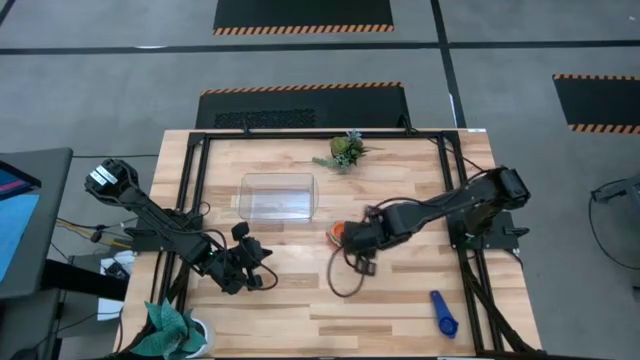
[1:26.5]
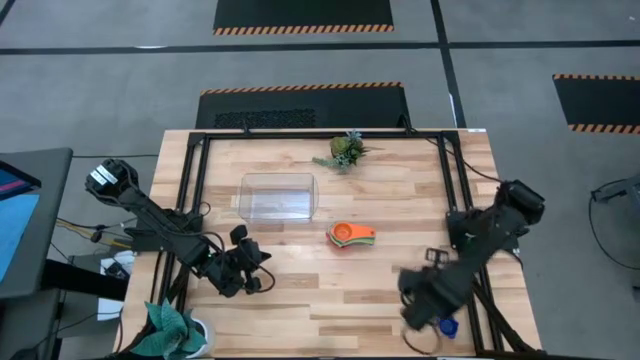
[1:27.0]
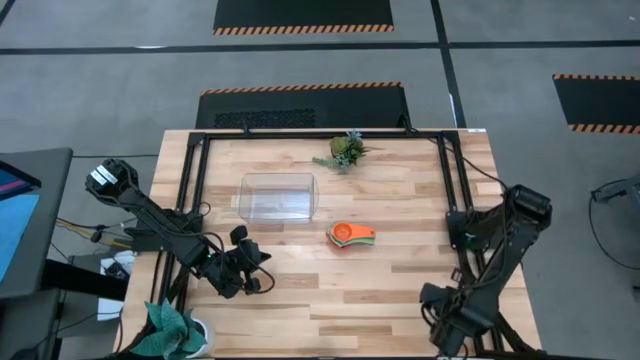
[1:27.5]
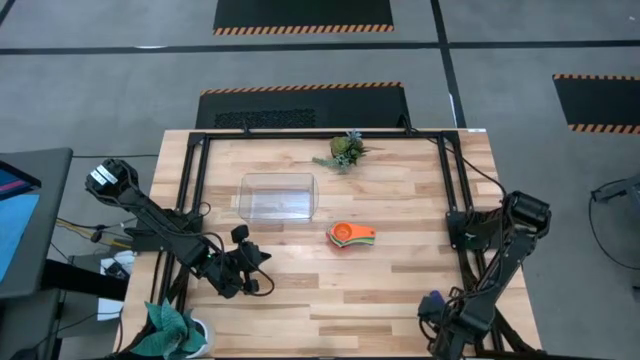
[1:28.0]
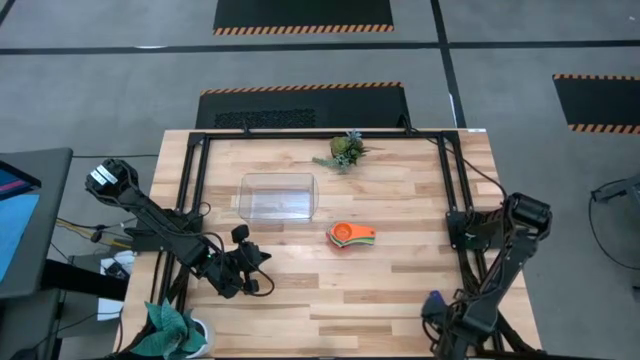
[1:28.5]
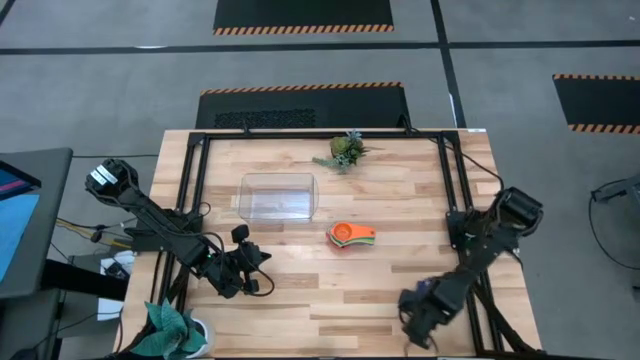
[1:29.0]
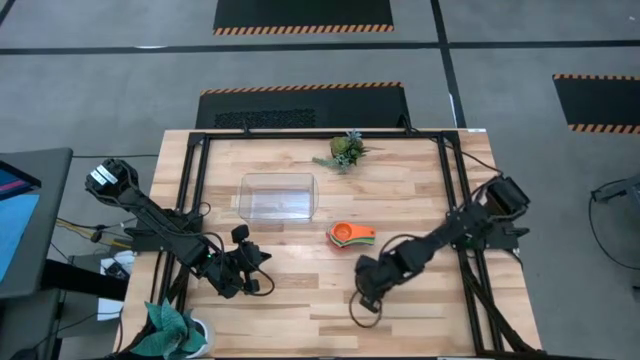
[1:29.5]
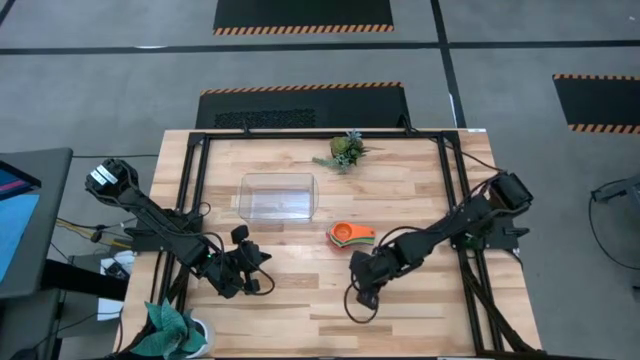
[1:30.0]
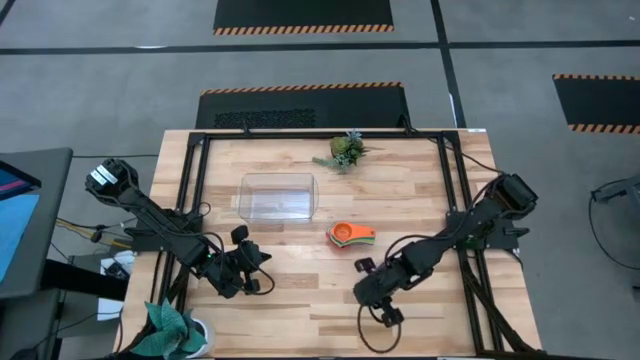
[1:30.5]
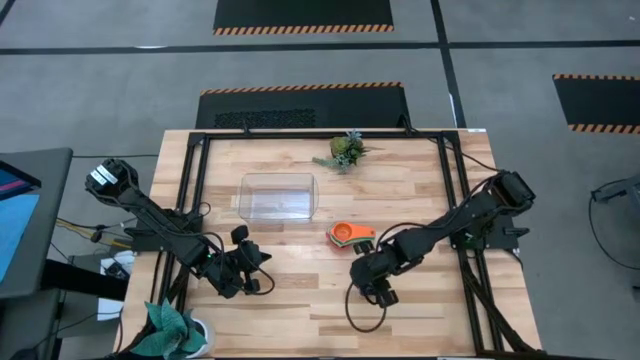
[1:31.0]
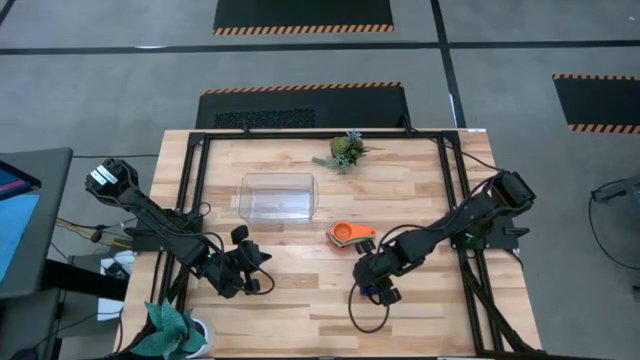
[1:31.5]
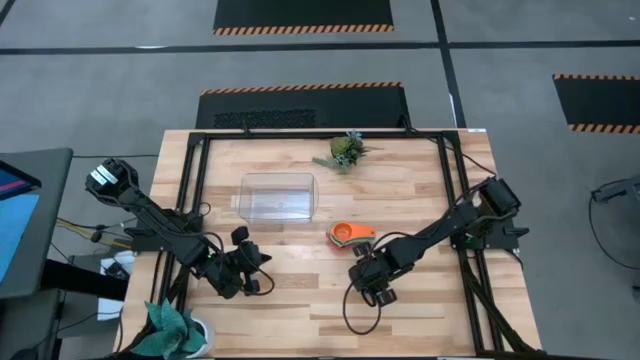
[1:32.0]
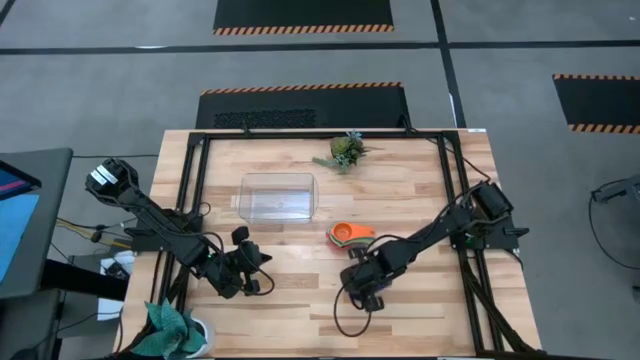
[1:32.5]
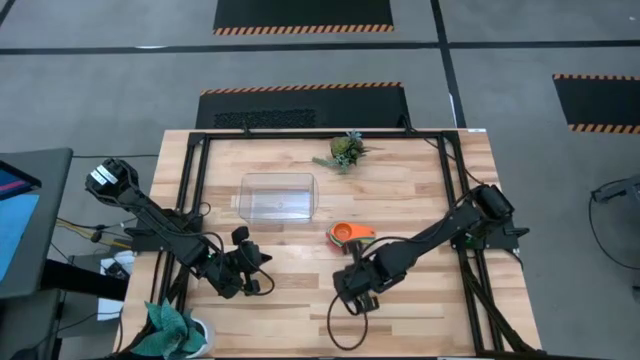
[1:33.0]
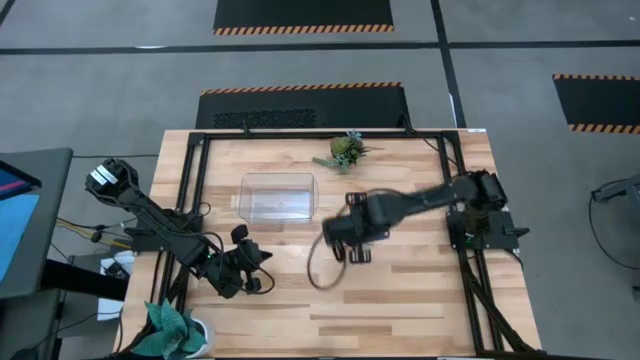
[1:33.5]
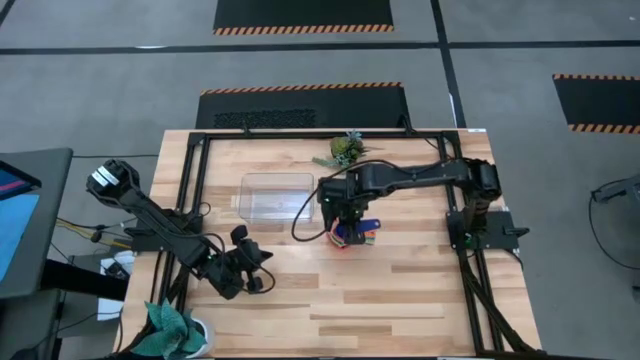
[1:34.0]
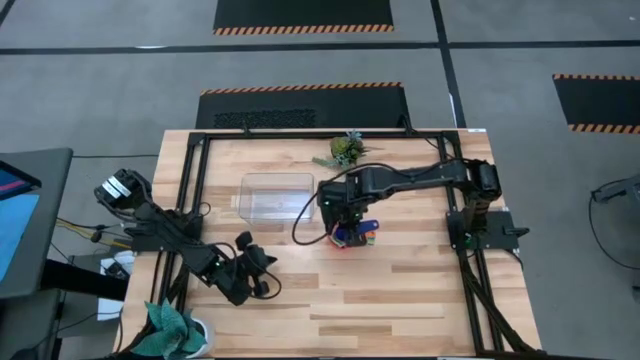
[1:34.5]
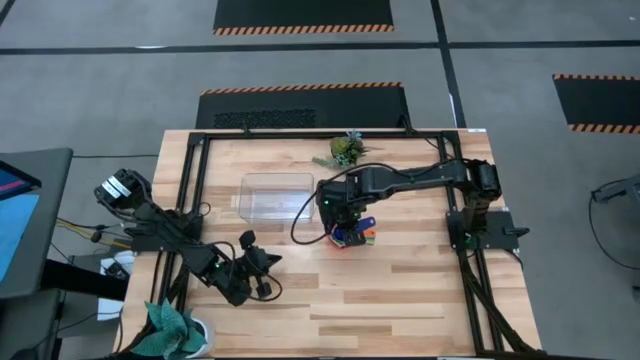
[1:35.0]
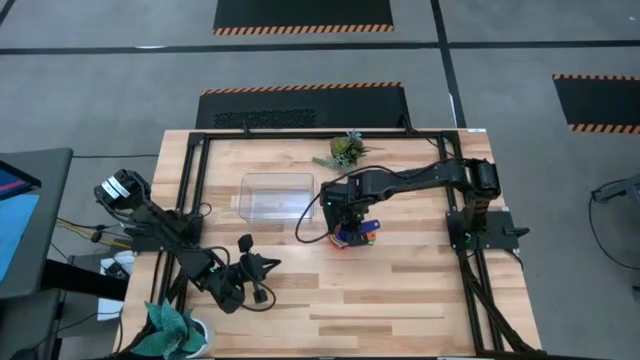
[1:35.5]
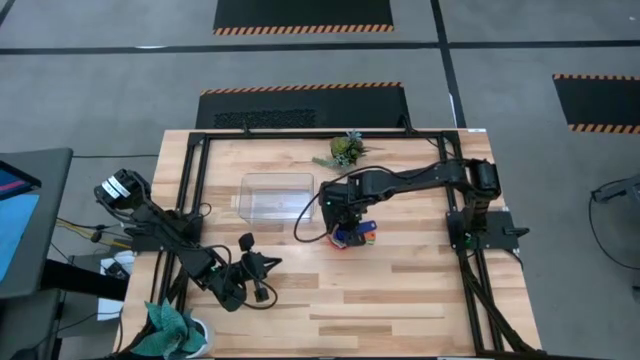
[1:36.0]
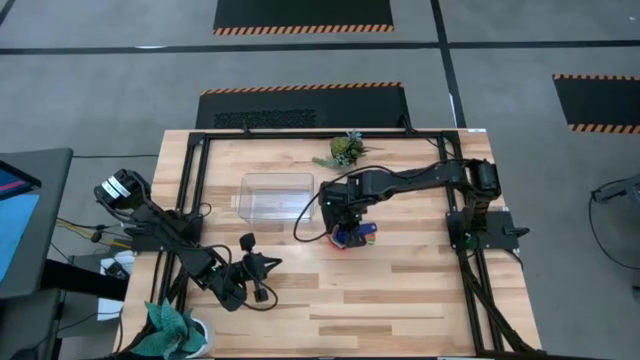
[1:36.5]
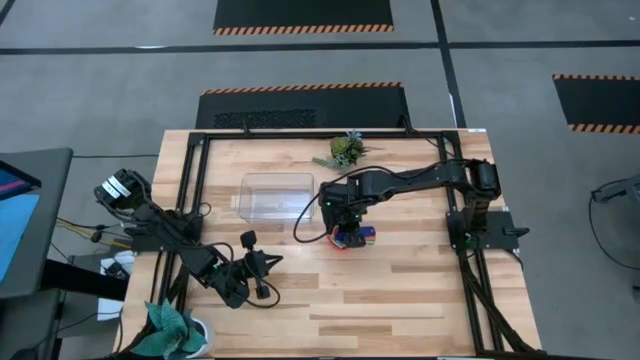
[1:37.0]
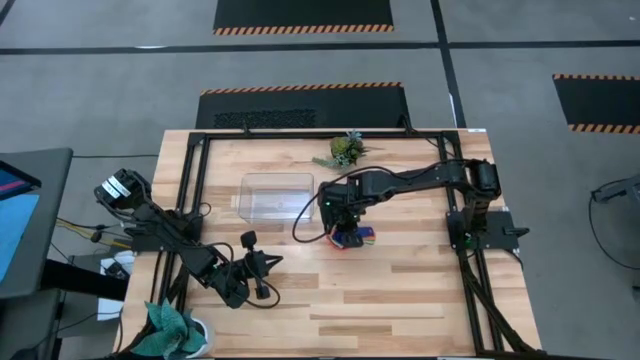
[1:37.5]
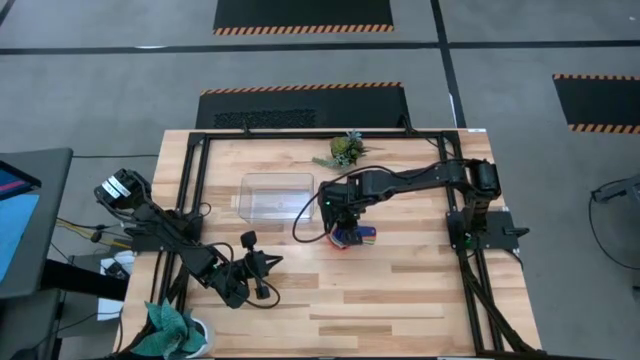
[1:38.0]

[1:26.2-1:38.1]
Task: Nest measuring cups in basket
Stack the dark blue measuring cup on top of the orange measuring cup

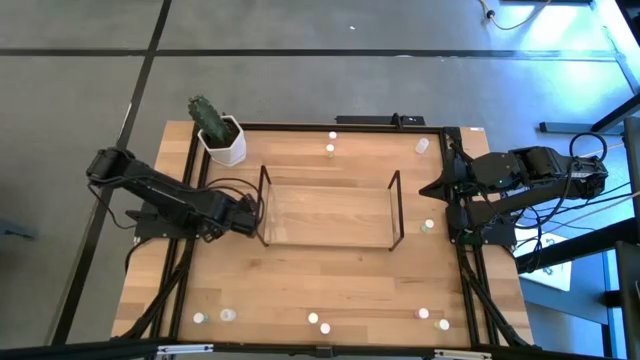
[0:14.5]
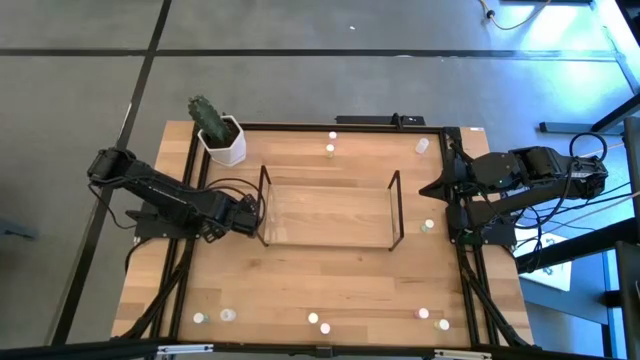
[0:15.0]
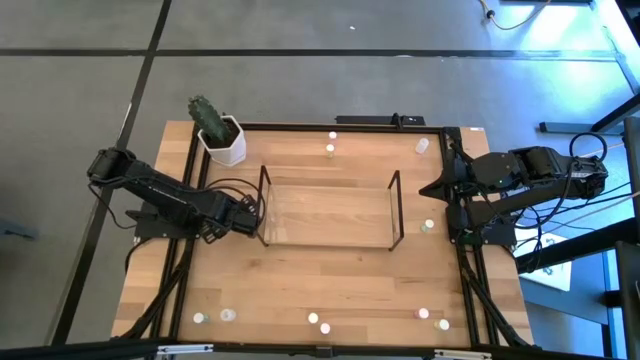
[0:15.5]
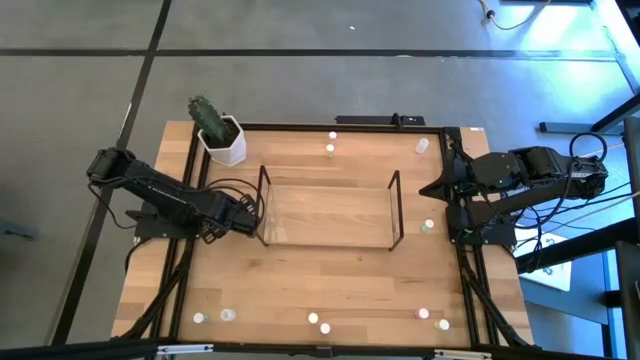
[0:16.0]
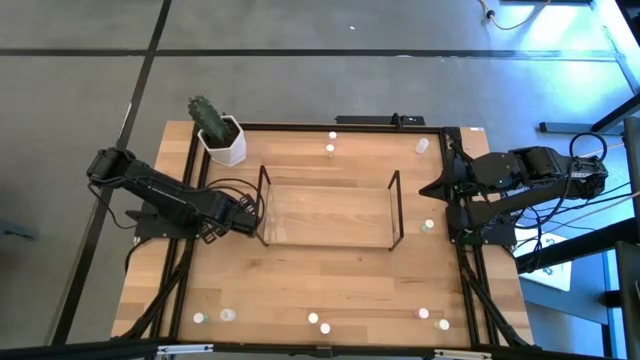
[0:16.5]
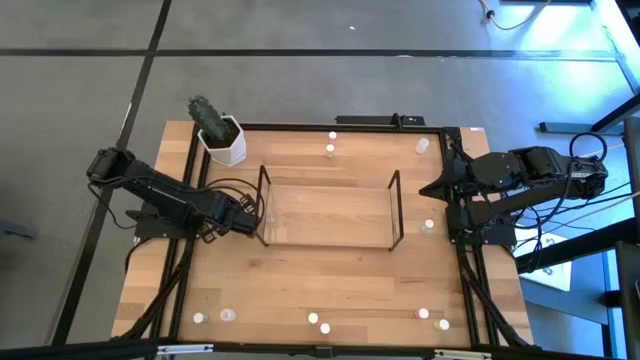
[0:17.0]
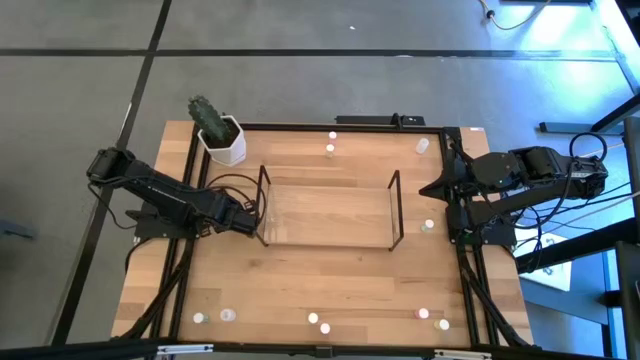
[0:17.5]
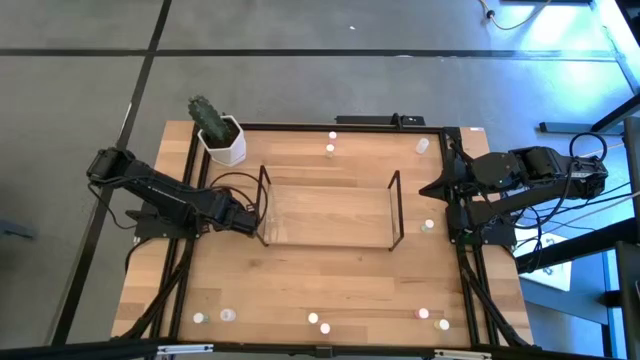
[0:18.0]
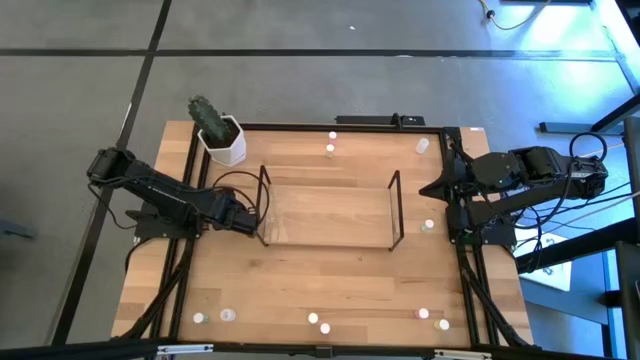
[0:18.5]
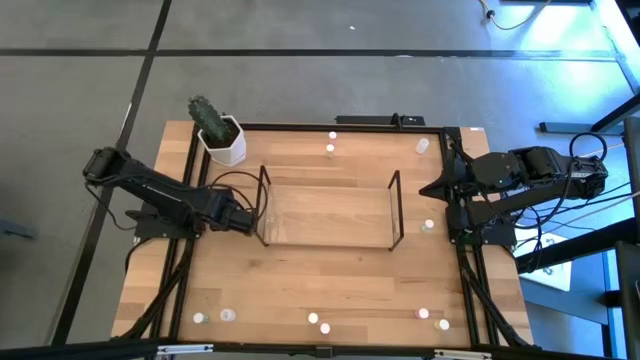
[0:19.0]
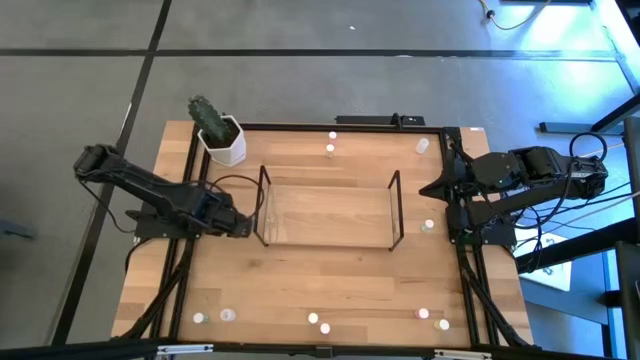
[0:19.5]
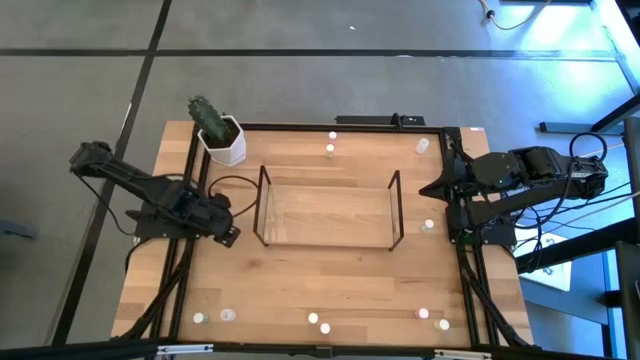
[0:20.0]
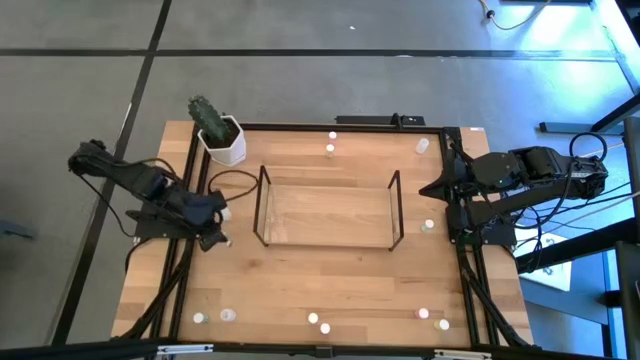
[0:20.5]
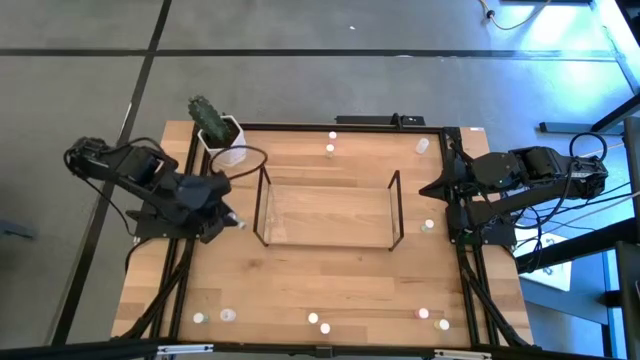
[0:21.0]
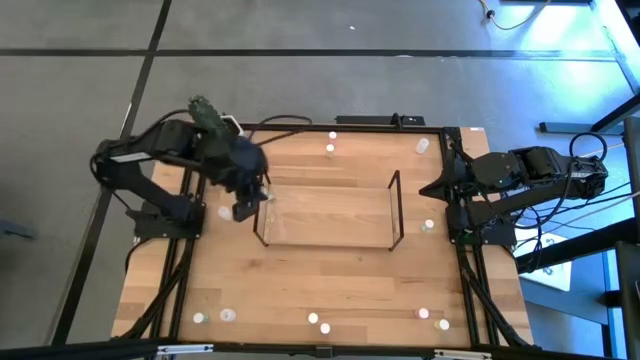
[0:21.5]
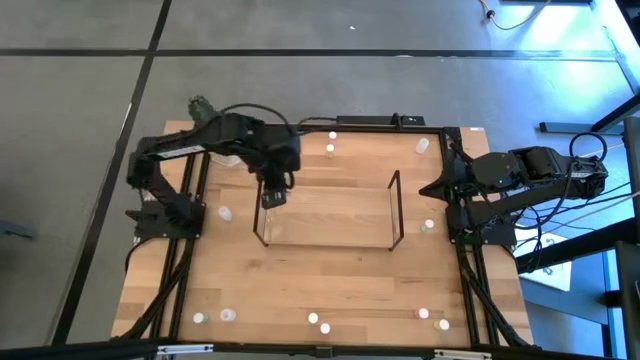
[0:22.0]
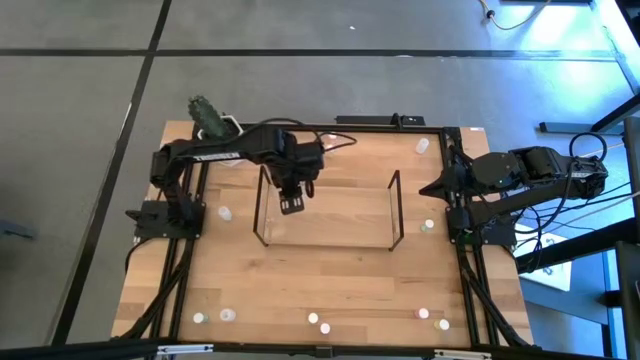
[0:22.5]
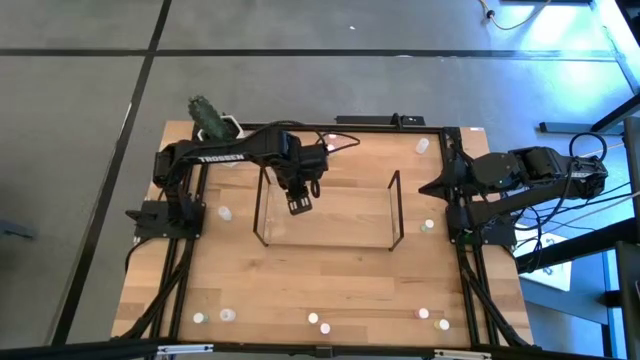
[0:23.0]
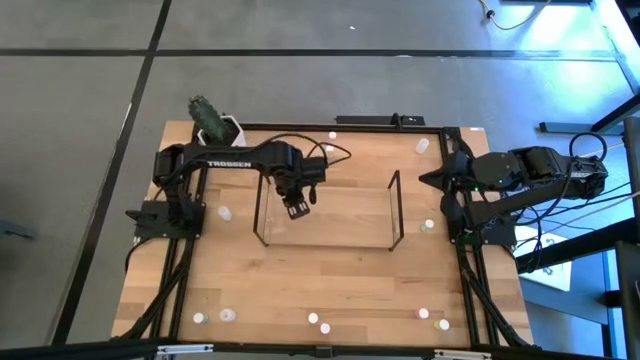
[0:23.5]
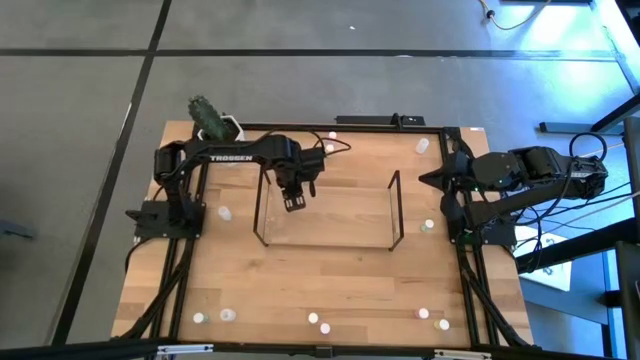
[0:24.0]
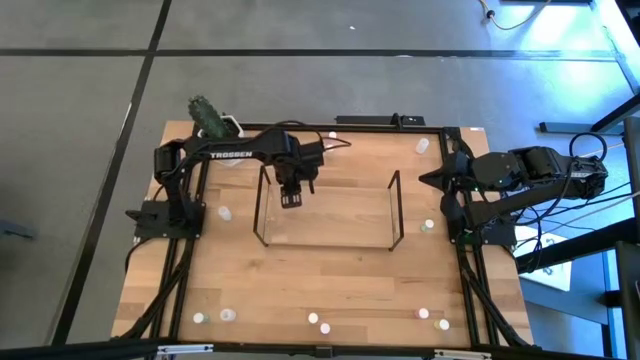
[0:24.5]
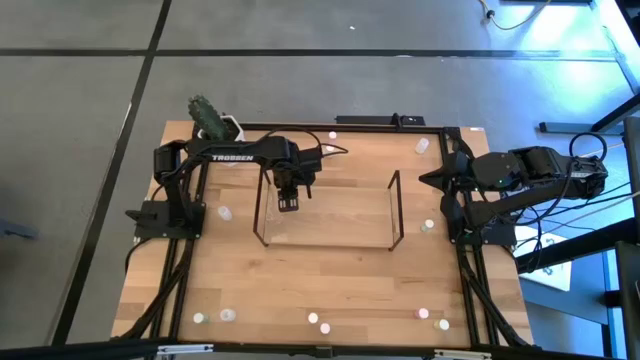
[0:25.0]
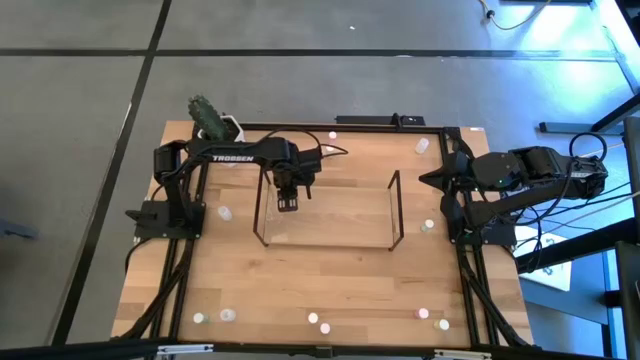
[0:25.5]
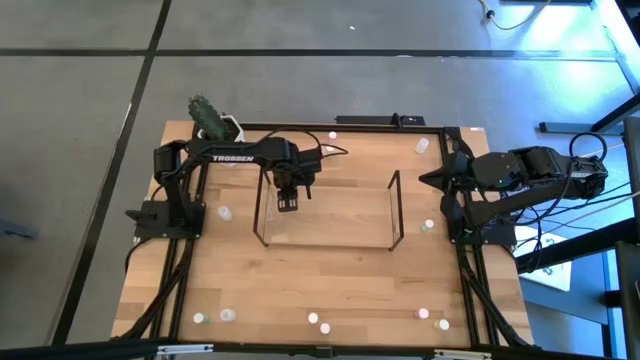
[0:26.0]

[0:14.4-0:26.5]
Task: Pick and place medicine bottles onto shelf by color
Put the top left blue pill bottle on the shelf
